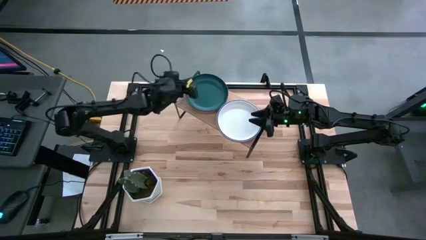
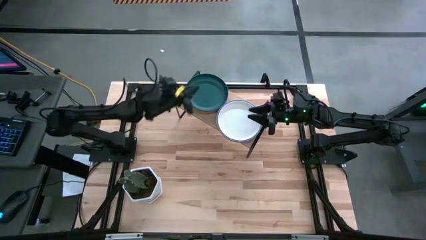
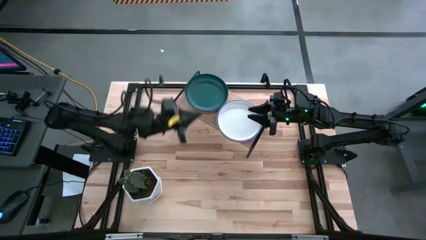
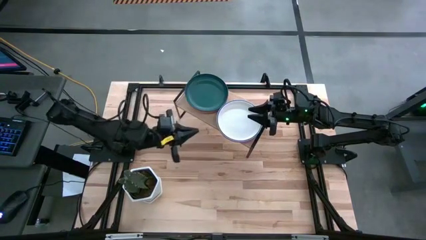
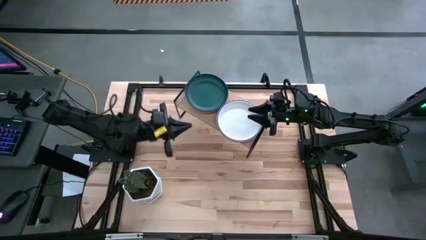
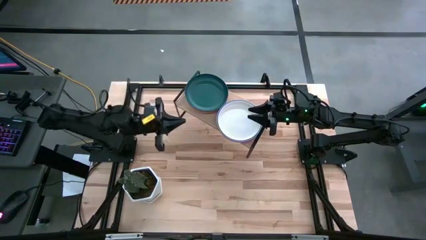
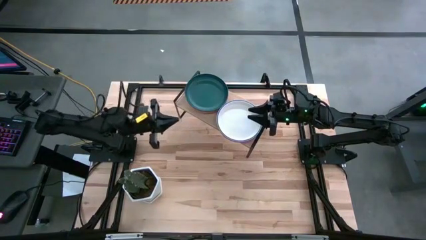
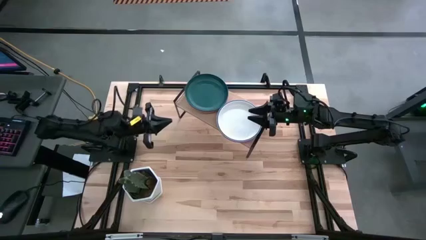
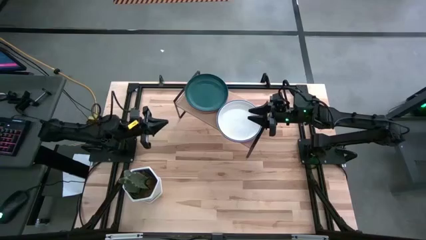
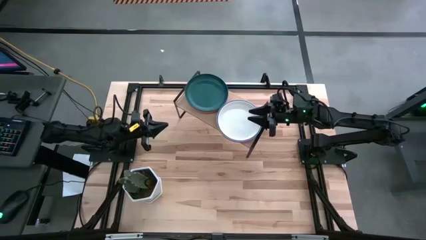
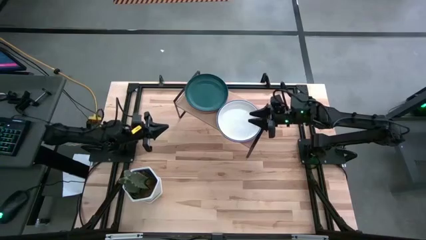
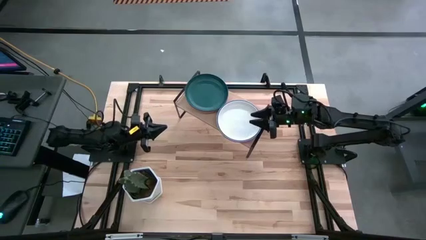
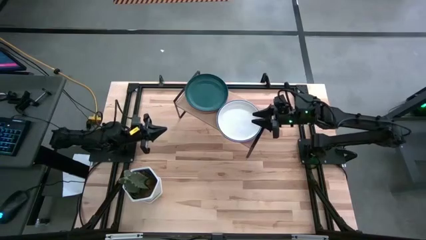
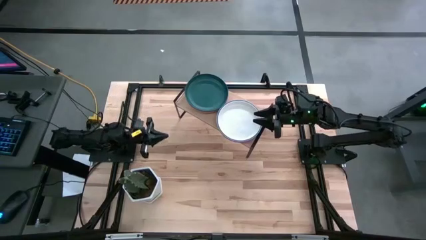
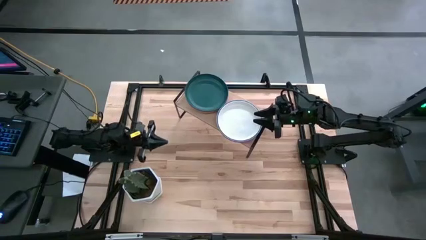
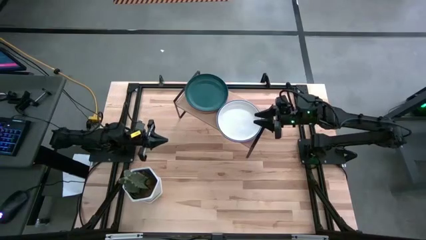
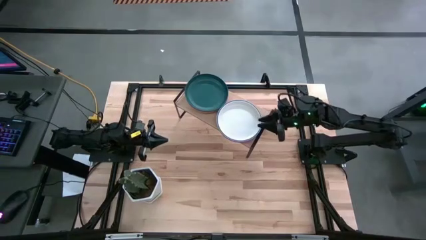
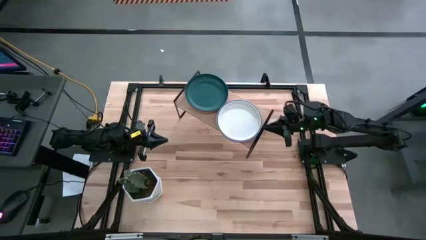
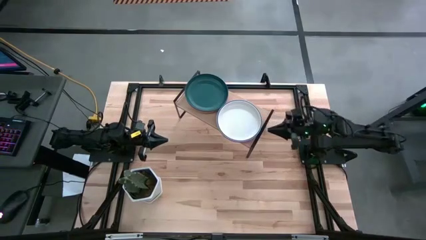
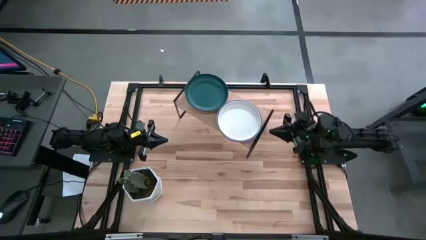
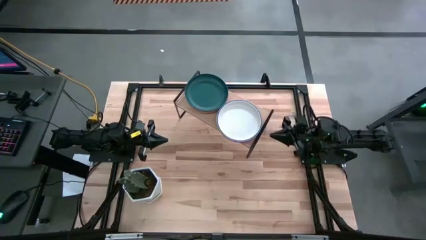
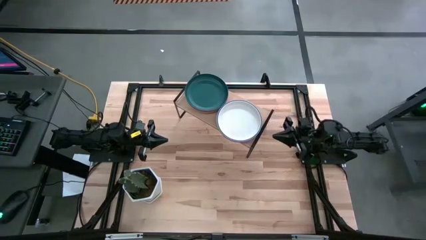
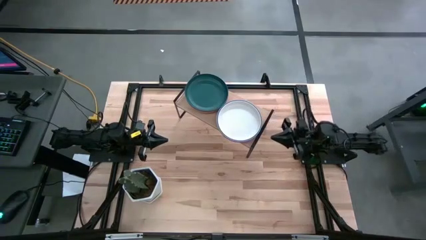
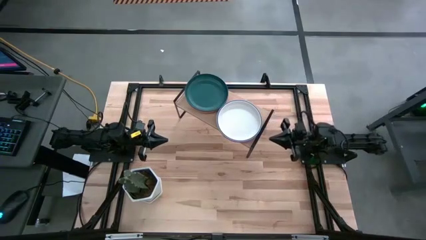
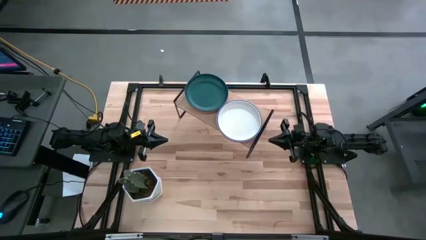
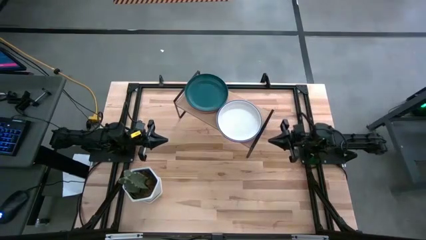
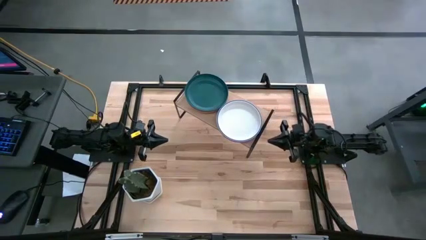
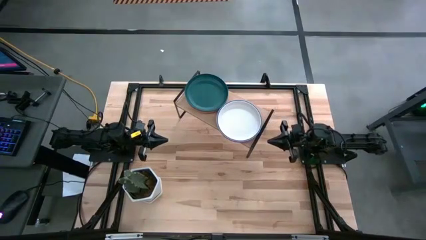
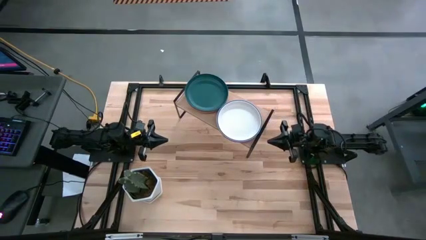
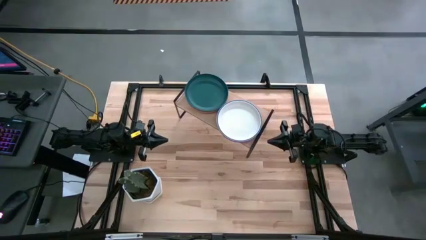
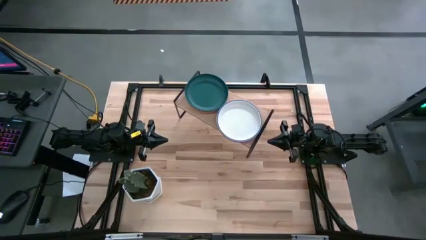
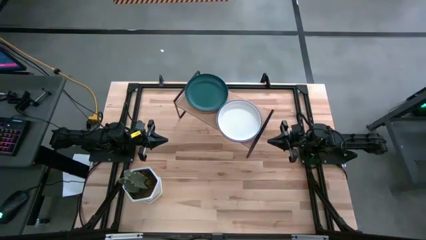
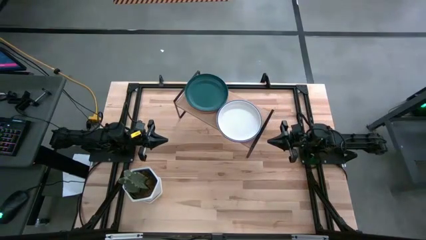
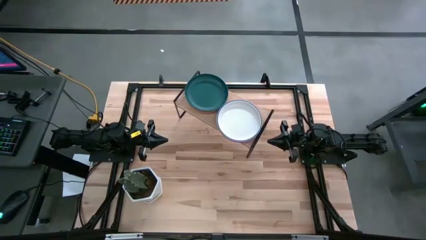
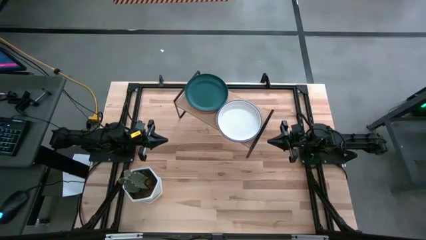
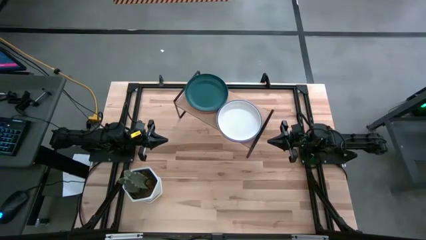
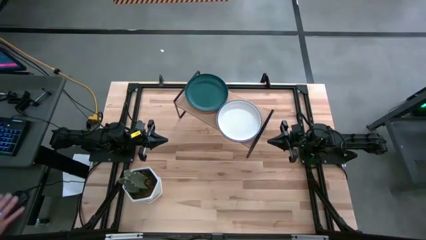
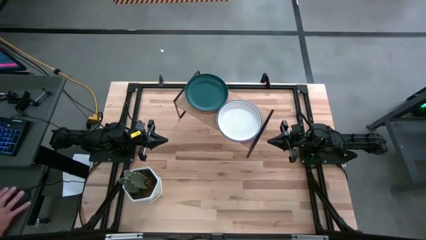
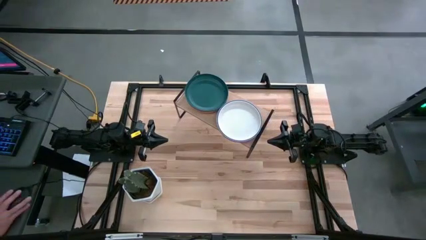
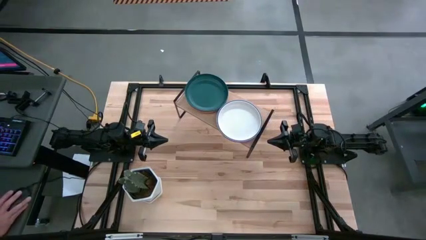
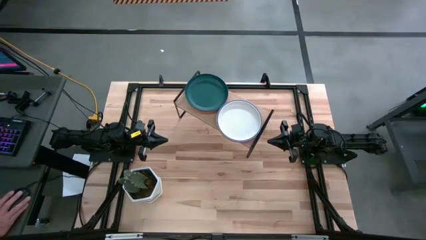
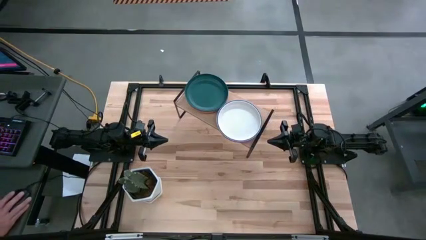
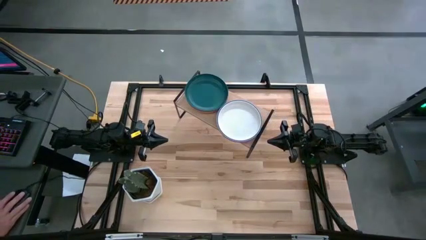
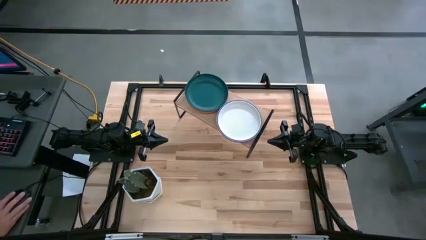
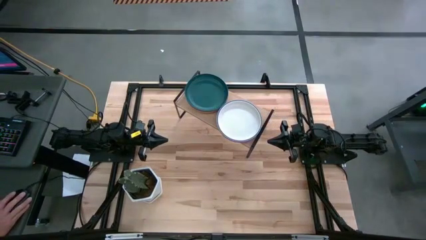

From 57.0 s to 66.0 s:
Task: Place and stack plates onto a shelf
Return to Home Position

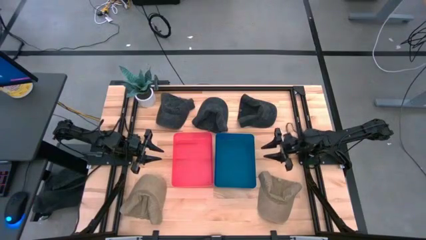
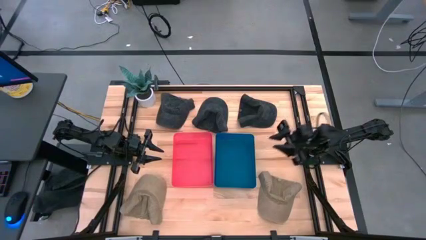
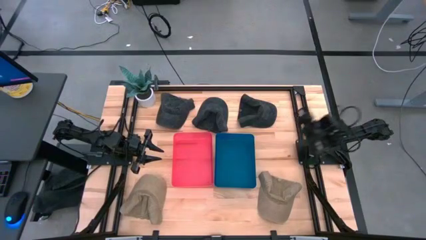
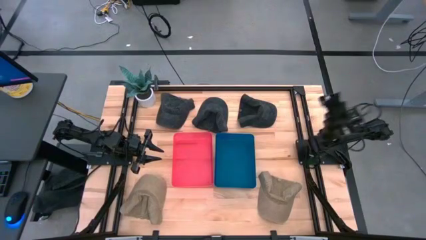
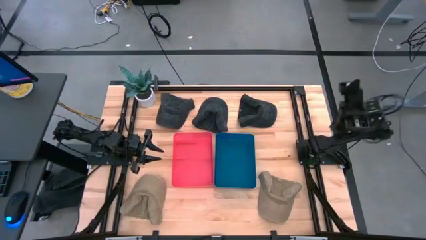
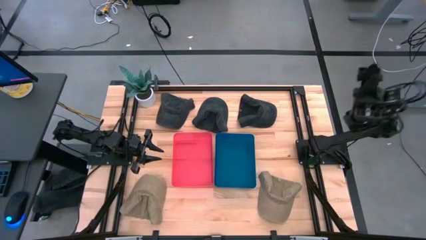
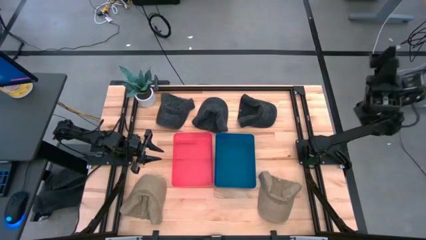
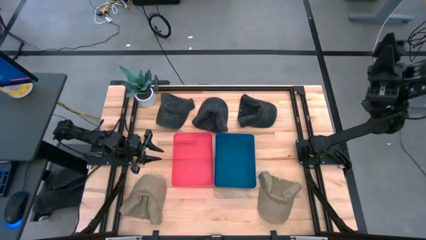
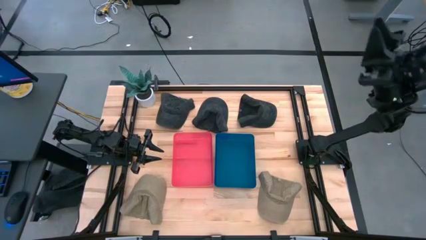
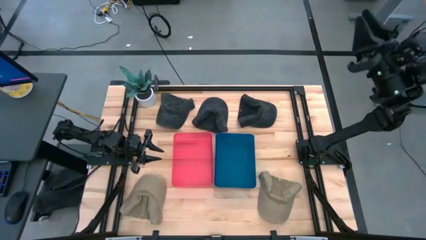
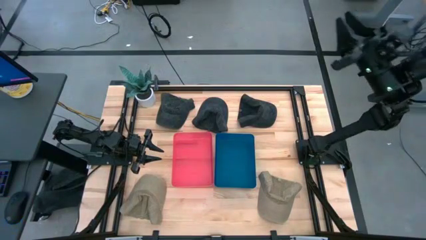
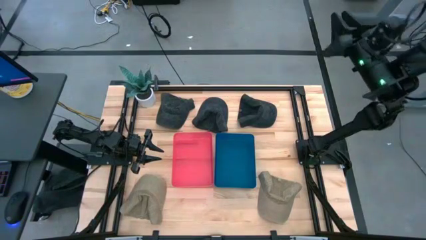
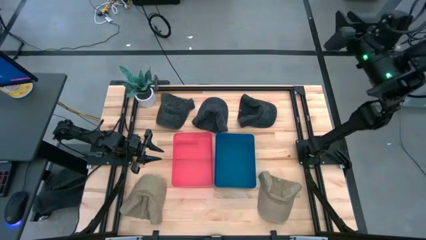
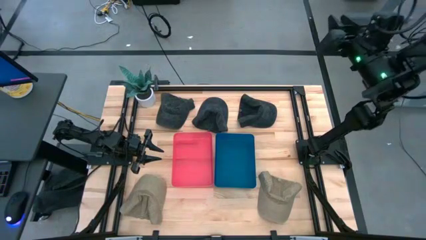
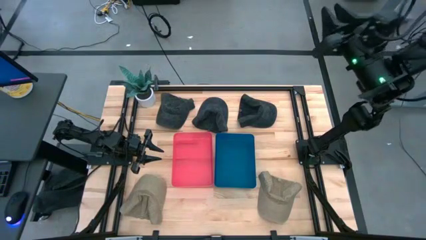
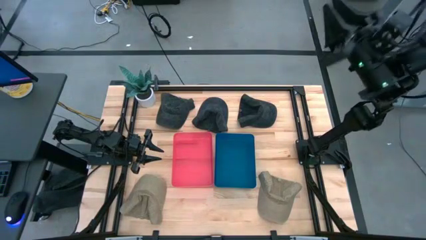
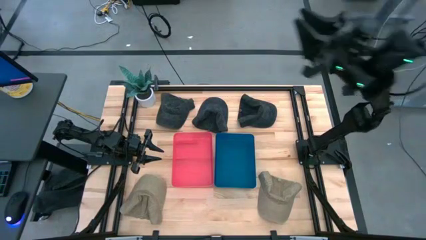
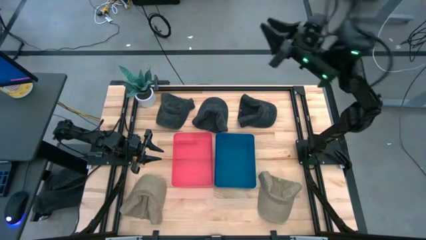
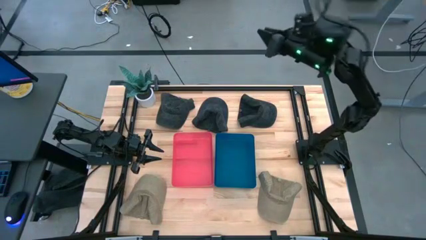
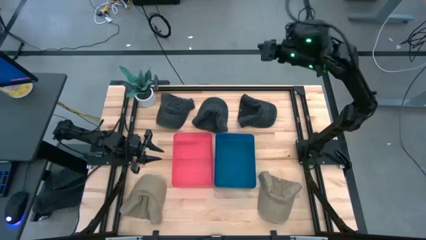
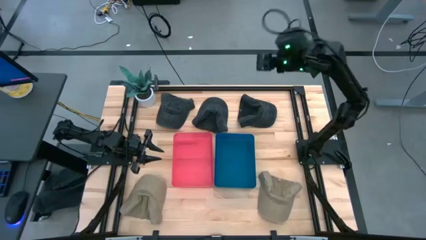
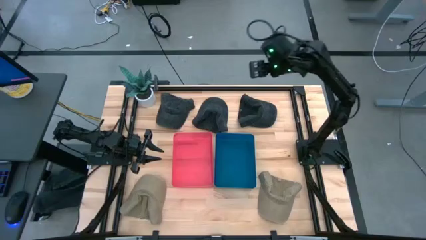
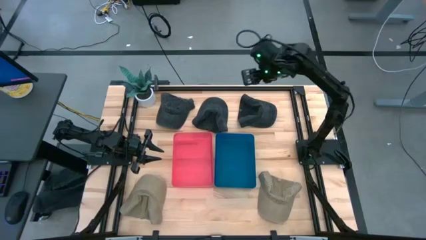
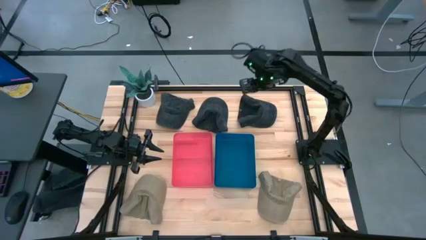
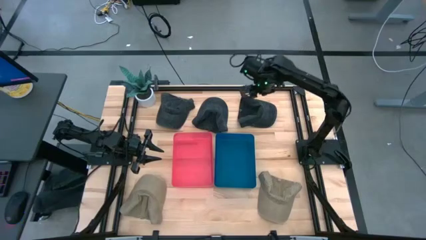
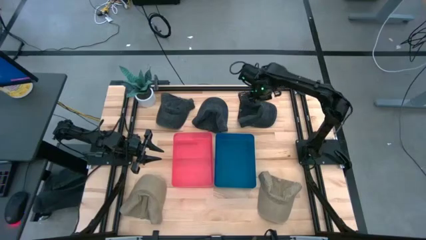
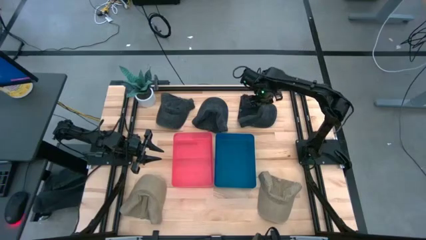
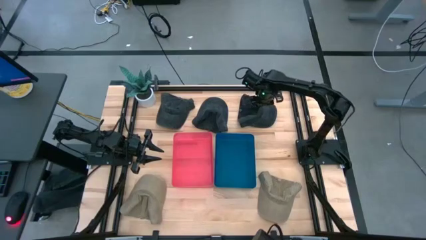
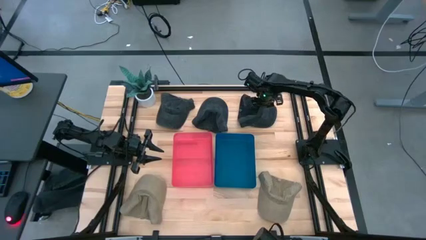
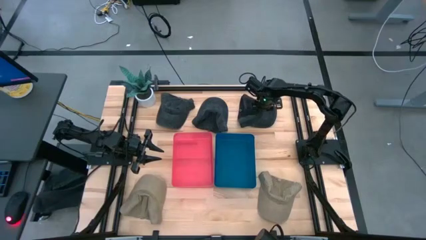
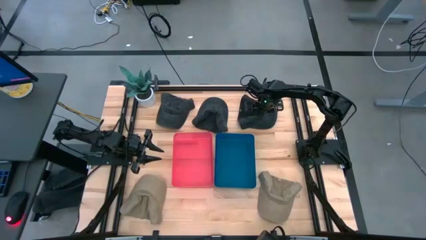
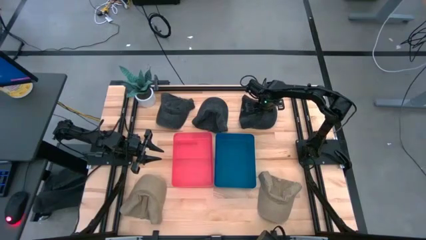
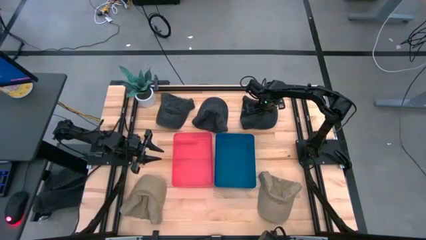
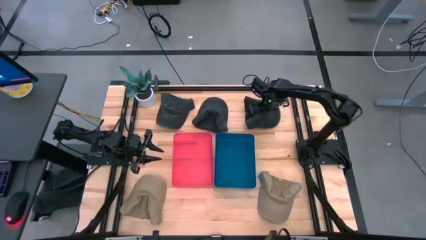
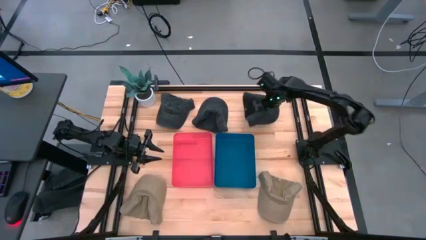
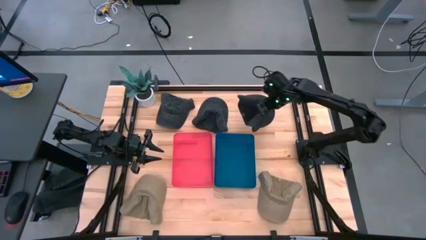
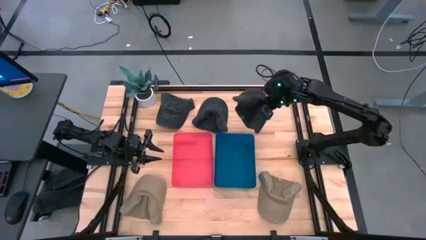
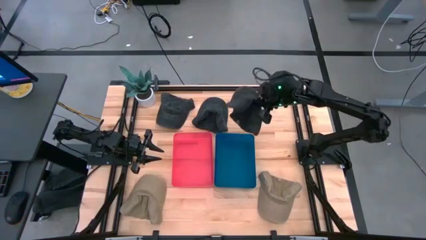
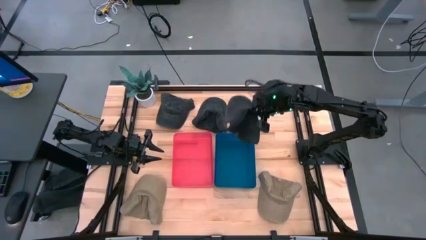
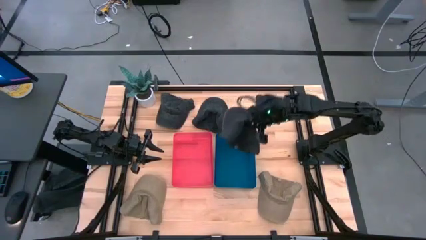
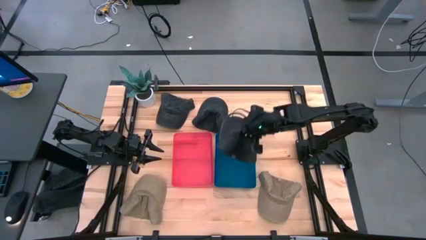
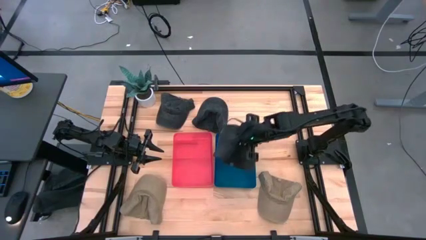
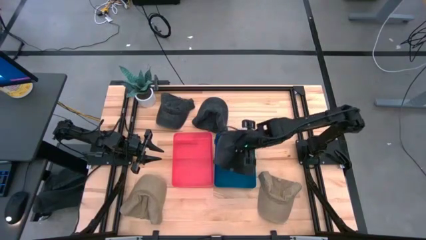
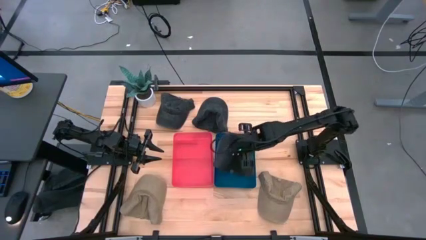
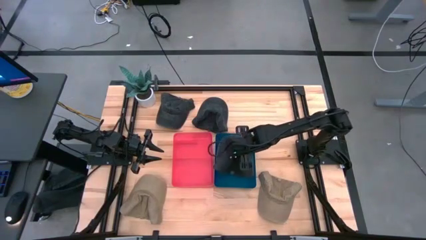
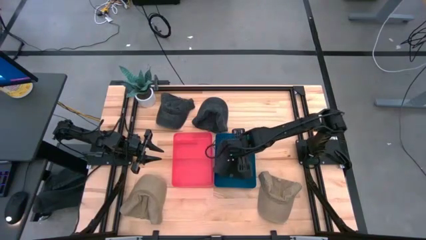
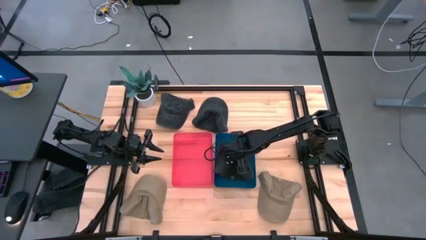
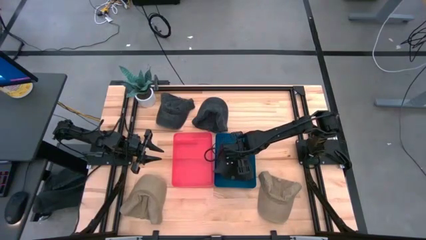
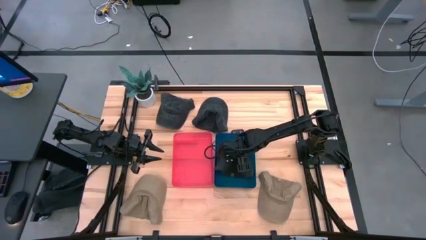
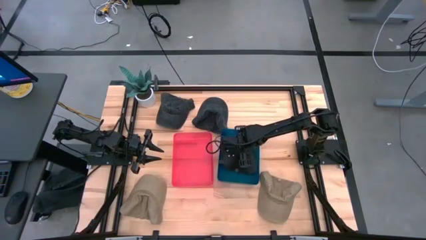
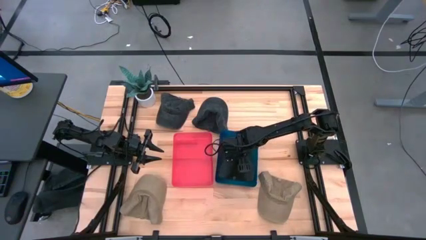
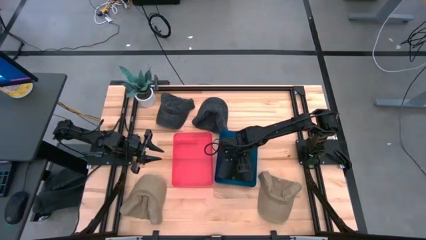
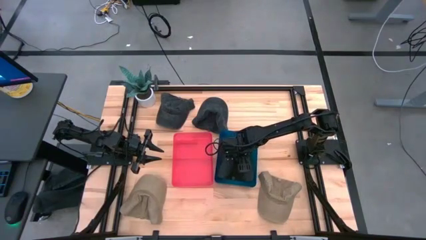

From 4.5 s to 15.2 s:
Task: Pick & Place hat
Put the right black cap into the blue bin
